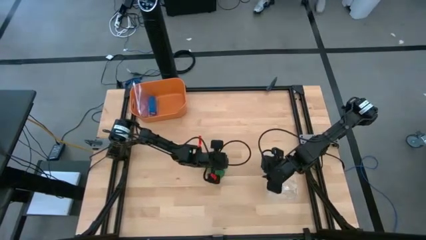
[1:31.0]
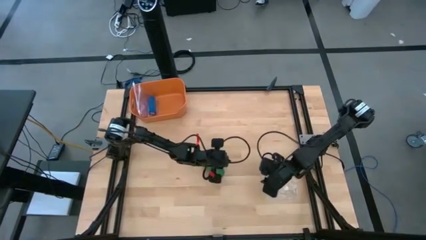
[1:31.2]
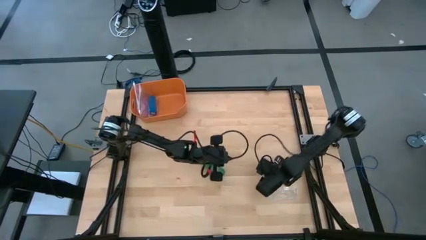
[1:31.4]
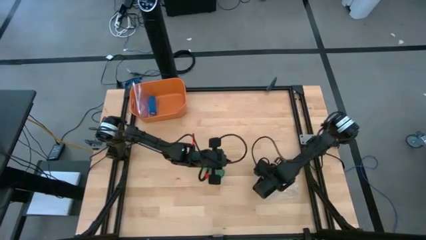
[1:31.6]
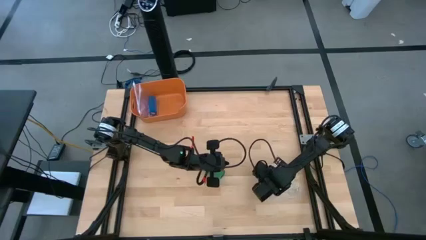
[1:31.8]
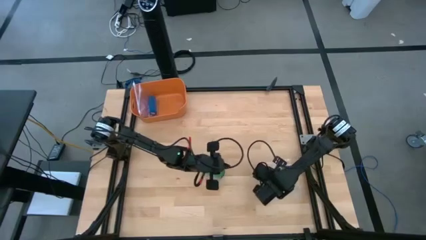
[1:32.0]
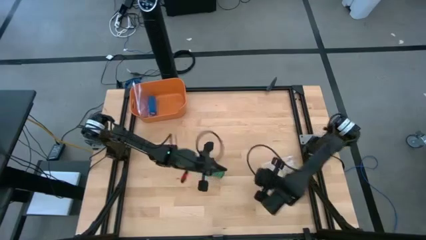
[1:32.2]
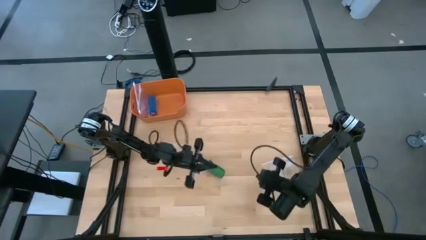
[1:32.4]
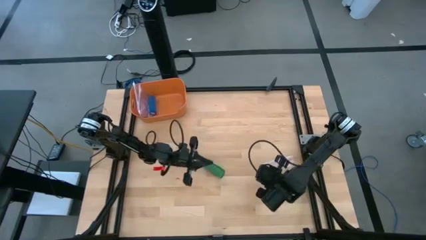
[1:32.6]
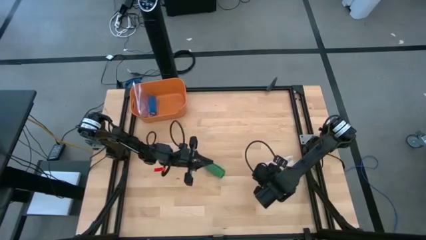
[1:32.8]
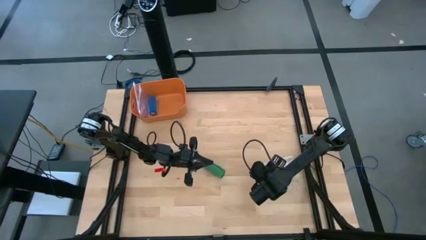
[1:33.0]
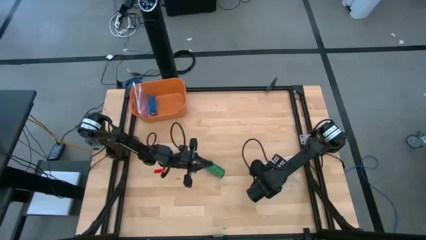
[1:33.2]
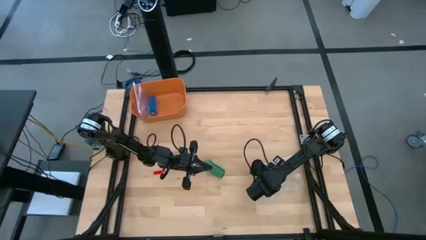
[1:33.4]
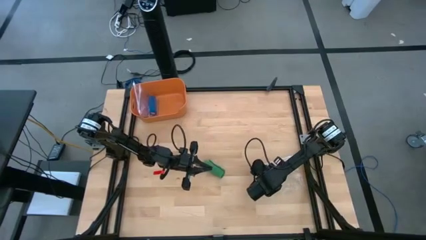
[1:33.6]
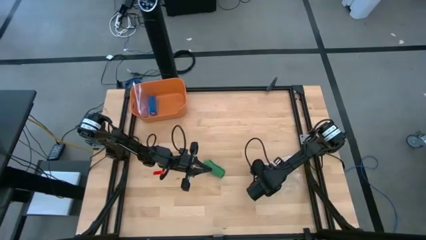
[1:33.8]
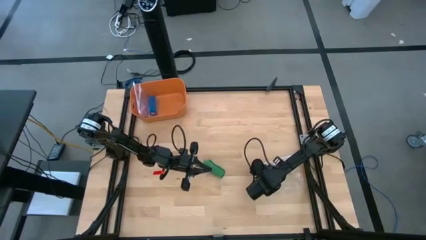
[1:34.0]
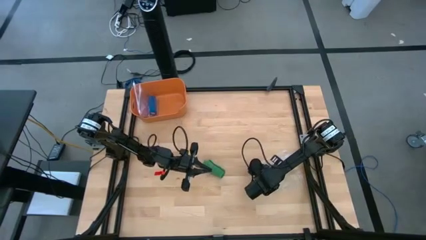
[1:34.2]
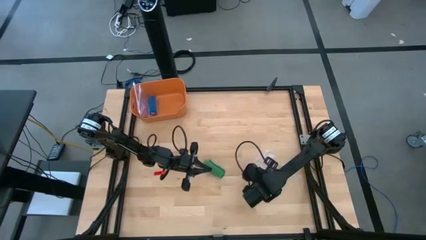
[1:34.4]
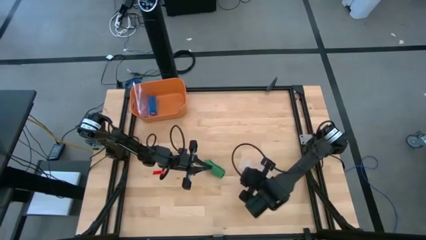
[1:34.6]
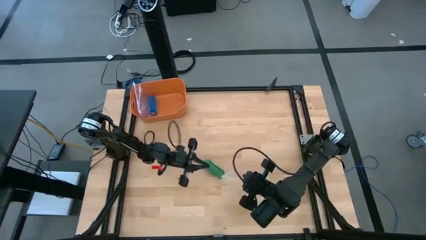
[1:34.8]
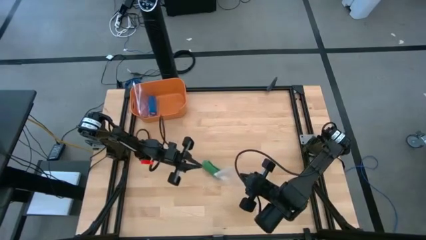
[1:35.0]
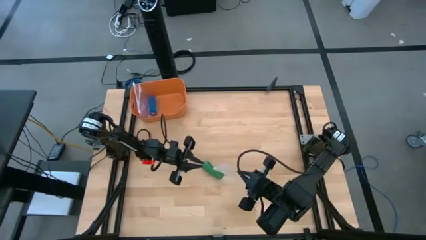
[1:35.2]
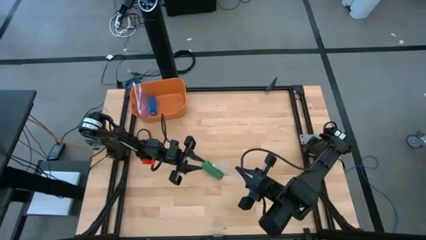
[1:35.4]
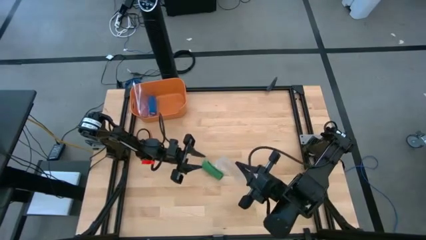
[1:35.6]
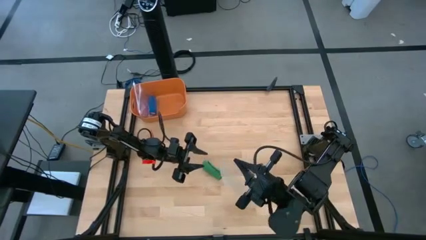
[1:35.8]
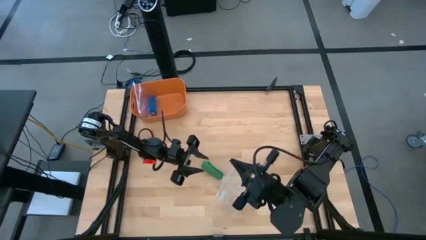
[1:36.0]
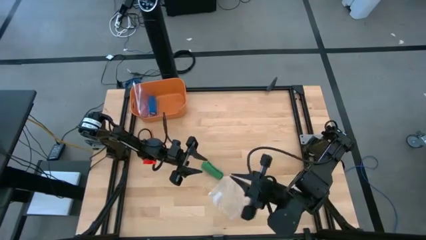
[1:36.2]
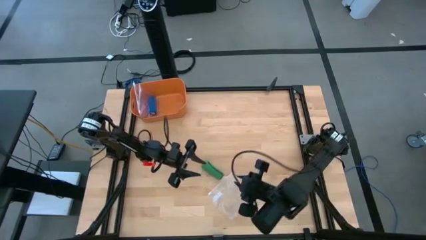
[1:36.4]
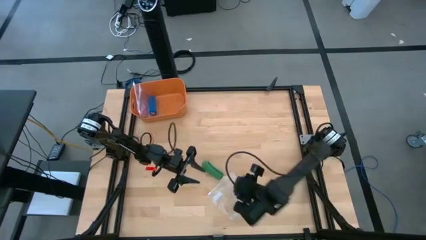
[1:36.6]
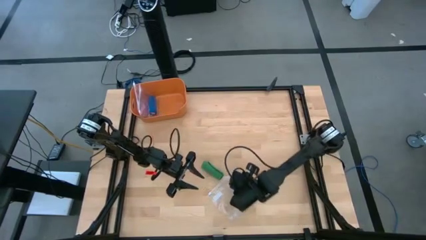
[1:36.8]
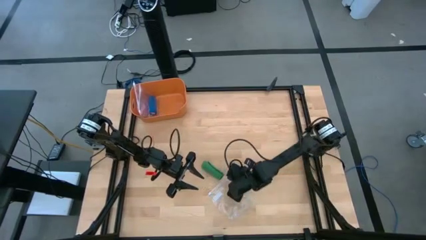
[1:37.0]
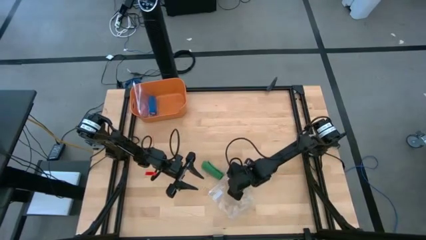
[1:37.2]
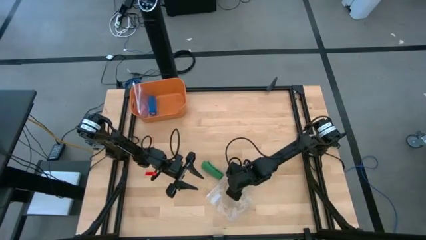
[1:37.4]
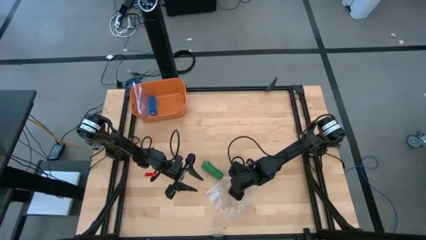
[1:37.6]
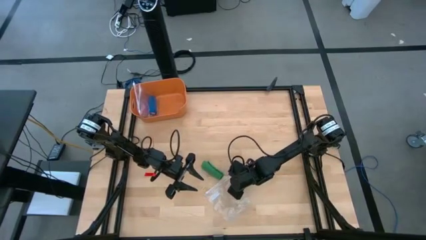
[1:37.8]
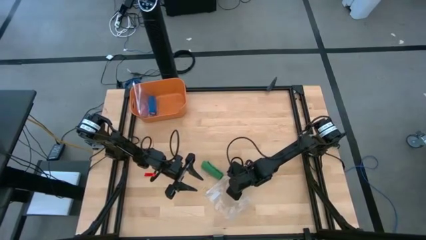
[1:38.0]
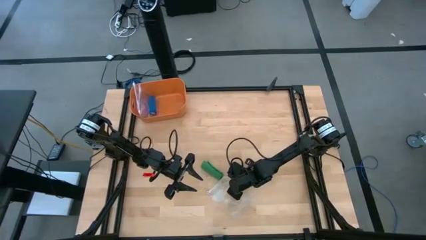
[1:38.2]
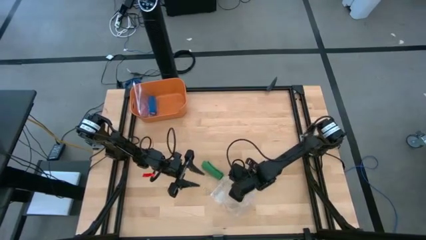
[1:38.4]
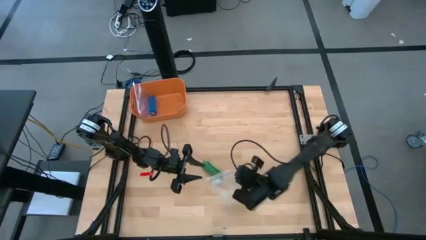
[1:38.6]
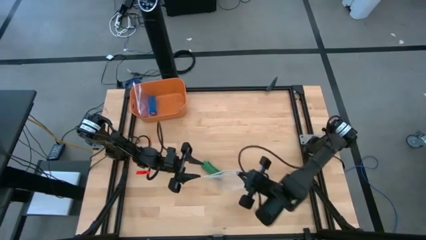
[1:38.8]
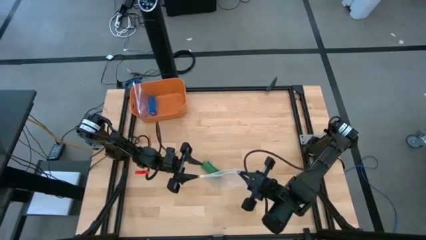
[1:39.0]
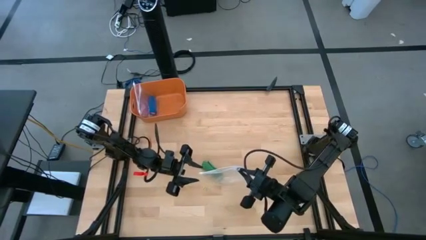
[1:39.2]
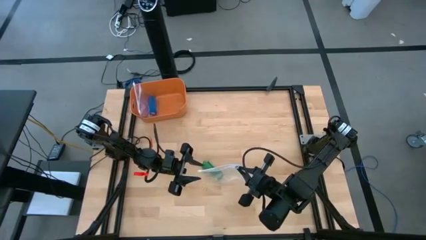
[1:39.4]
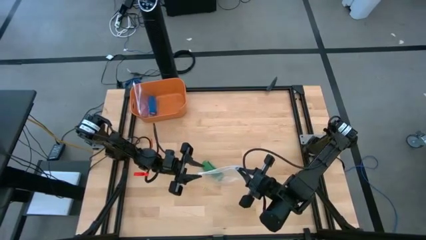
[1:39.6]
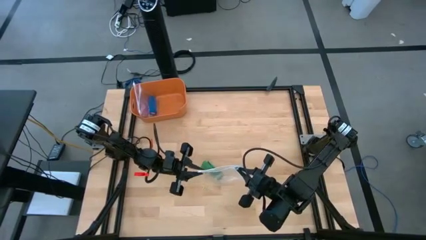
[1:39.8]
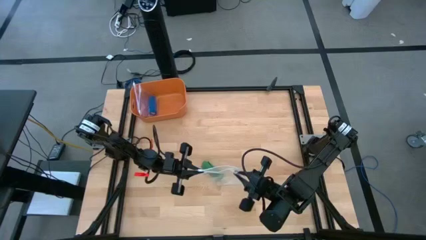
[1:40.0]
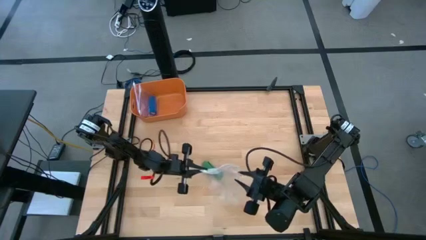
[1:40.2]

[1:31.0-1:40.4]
Task: Roll bandage
Open the transparent zip bag

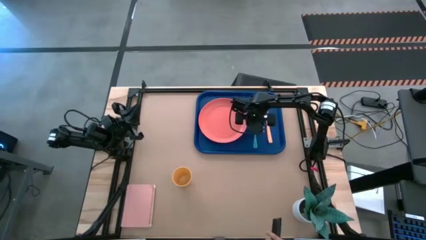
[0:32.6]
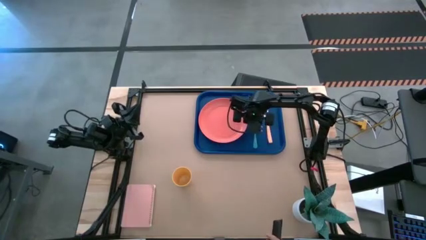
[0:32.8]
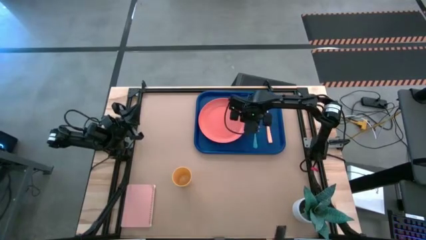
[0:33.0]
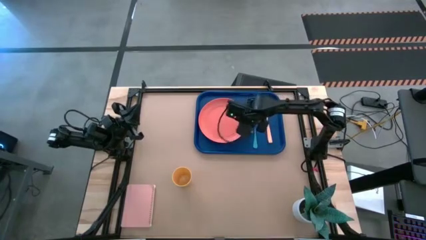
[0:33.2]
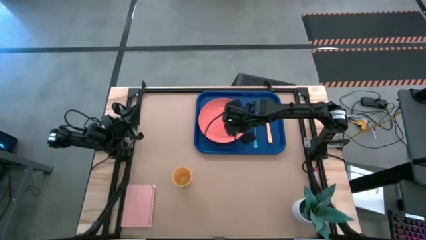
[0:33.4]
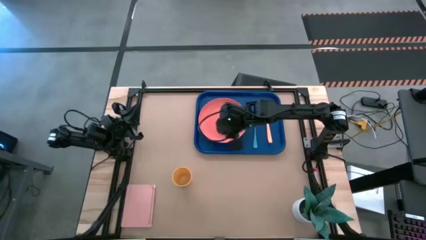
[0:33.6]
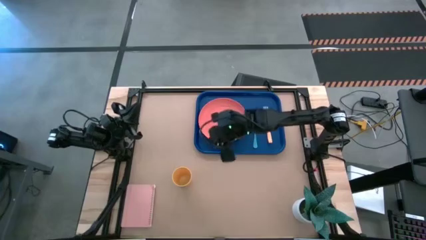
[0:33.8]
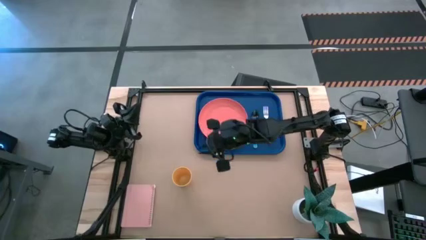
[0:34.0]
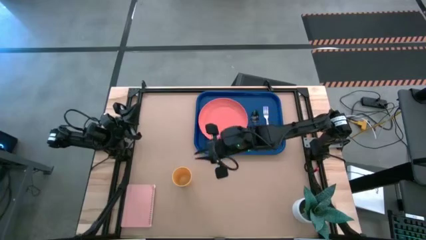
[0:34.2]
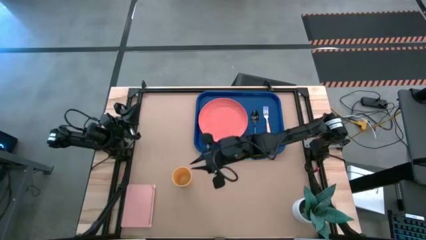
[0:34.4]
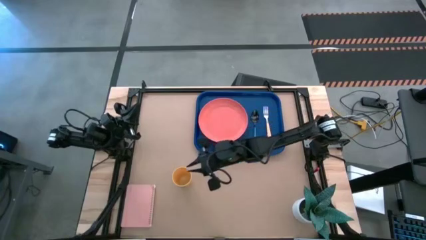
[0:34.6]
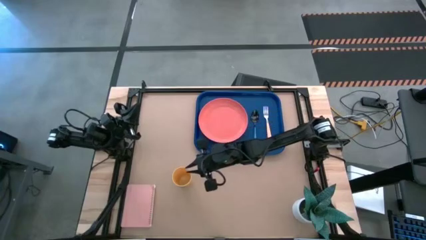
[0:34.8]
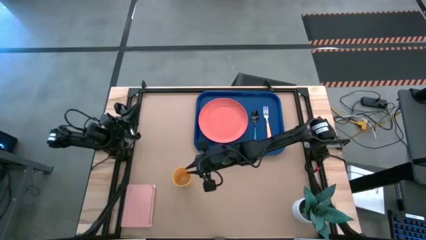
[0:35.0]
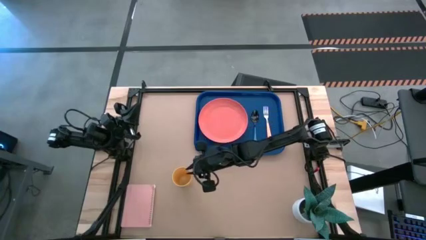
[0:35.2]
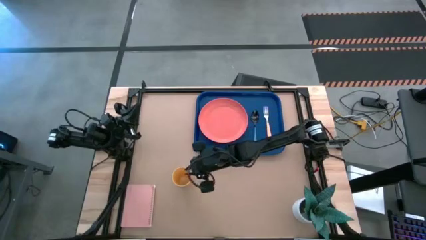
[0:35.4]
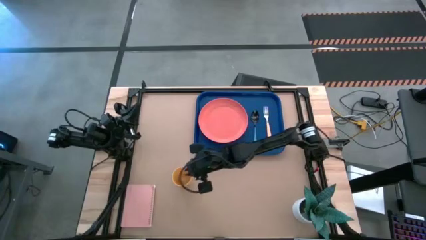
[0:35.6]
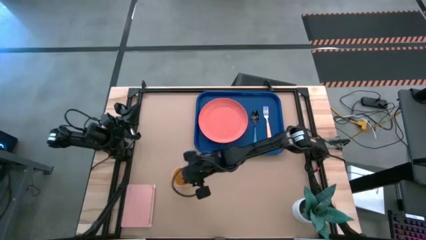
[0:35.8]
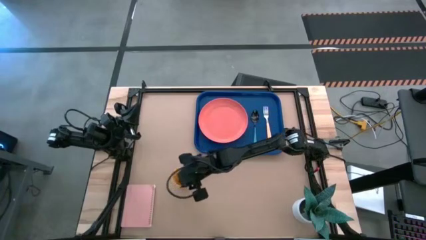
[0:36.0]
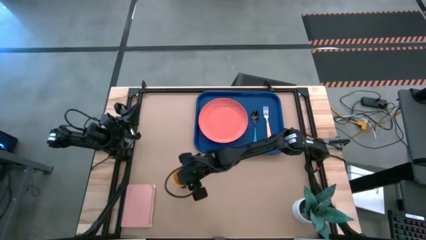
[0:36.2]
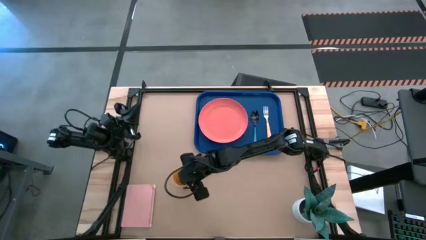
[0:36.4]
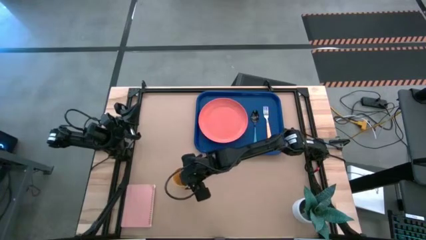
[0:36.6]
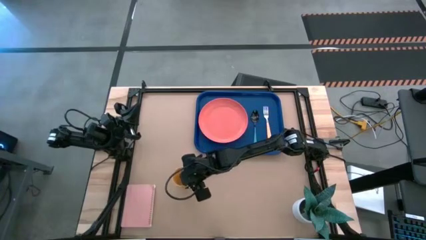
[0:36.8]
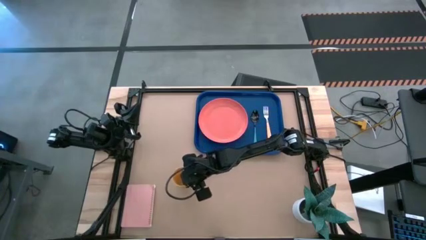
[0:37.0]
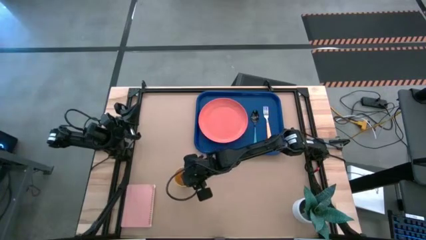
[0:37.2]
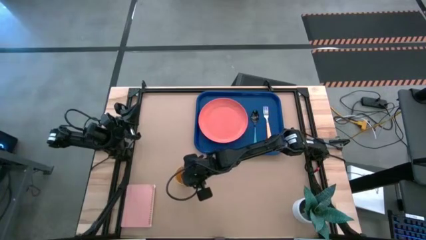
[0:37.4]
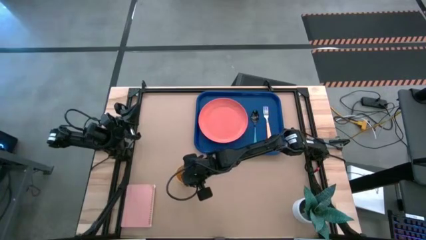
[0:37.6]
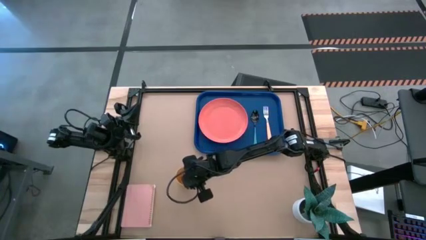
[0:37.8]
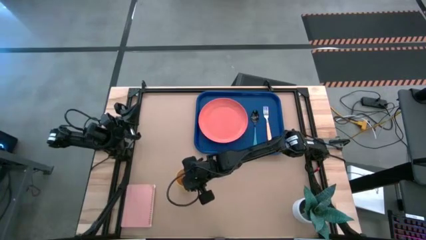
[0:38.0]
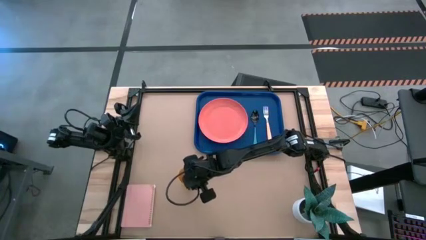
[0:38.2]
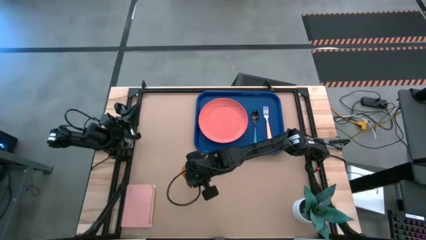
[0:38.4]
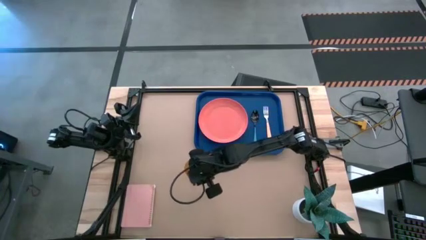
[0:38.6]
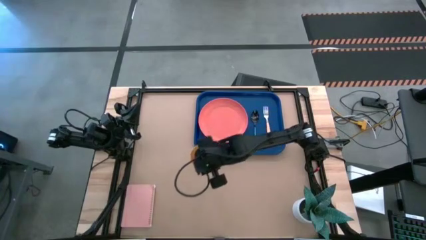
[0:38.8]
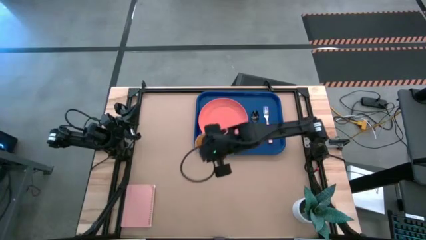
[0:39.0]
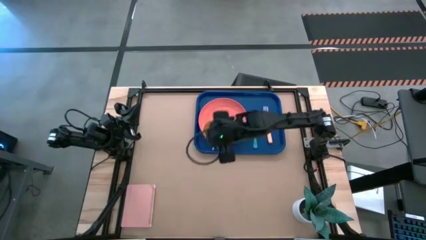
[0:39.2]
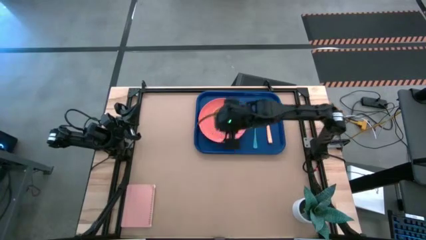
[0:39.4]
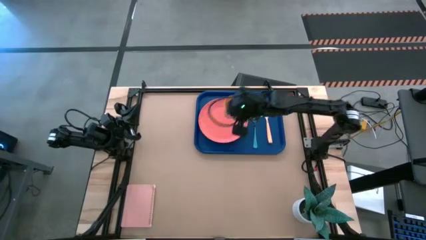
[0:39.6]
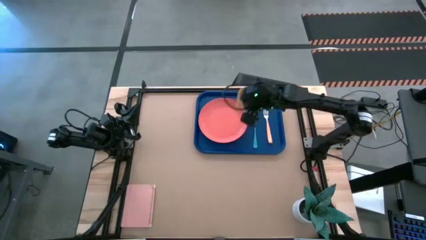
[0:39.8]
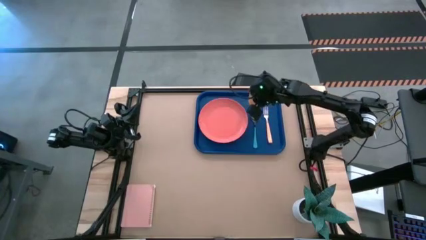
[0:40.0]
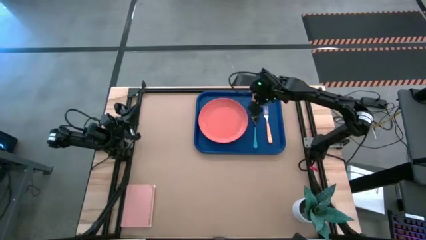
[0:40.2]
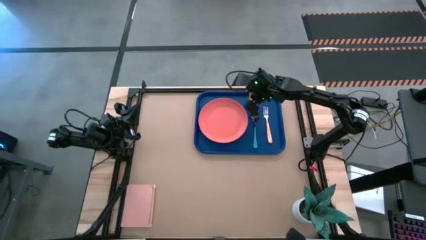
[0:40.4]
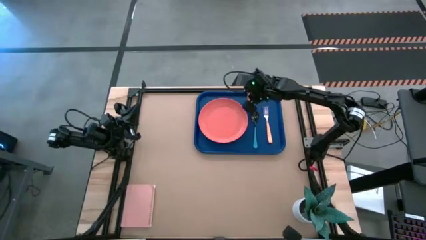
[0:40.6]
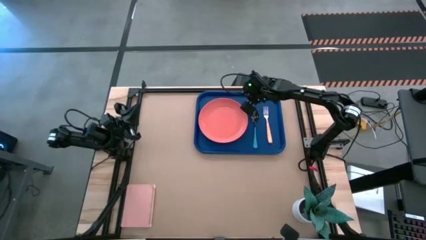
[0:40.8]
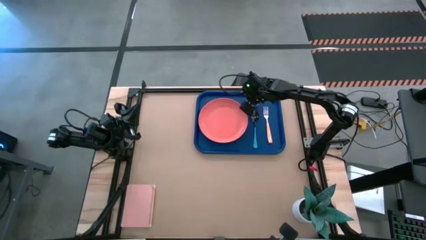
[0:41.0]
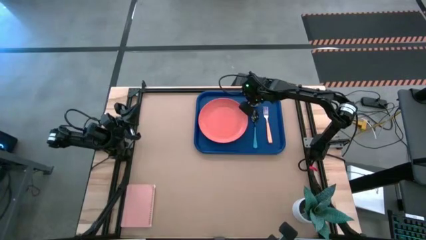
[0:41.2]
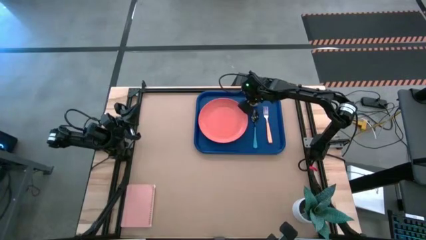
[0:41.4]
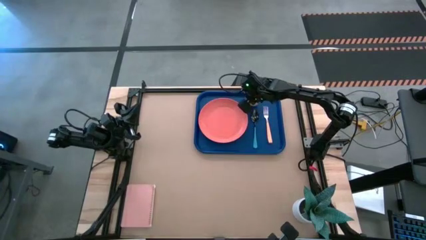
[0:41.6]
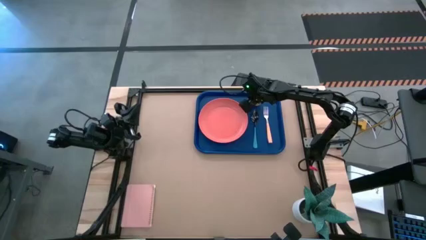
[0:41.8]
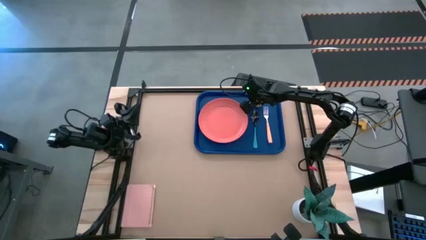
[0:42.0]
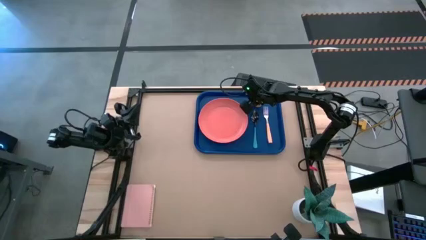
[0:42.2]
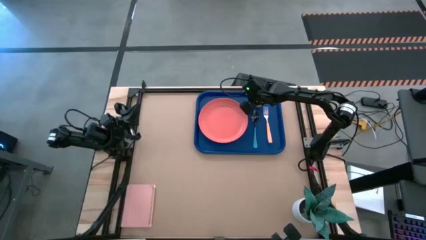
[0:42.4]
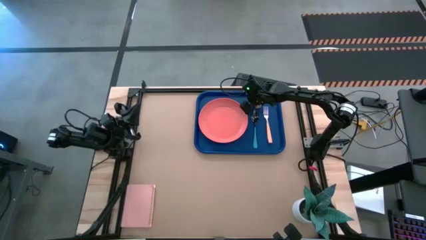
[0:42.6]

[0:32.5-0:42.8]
Task: Pick and place plate/cup/fork/spoon on tray
Put the yellow cup on the blue serving tray to the top right of the orange plate
